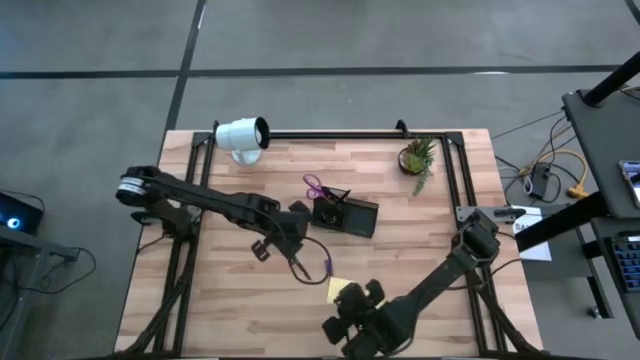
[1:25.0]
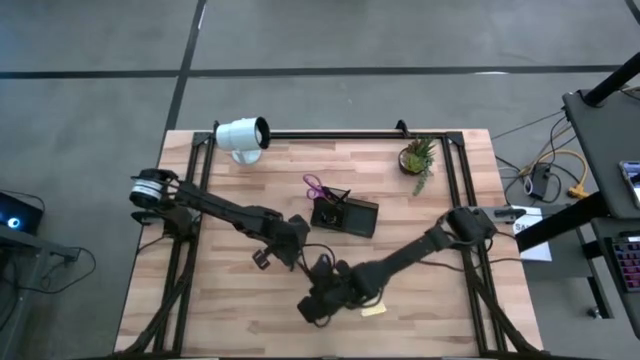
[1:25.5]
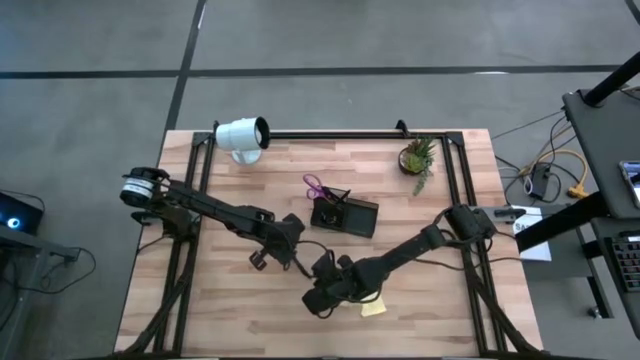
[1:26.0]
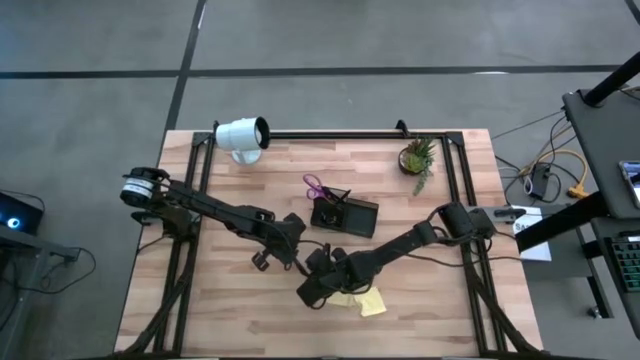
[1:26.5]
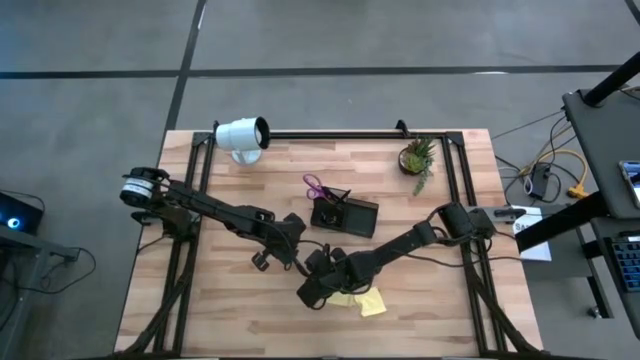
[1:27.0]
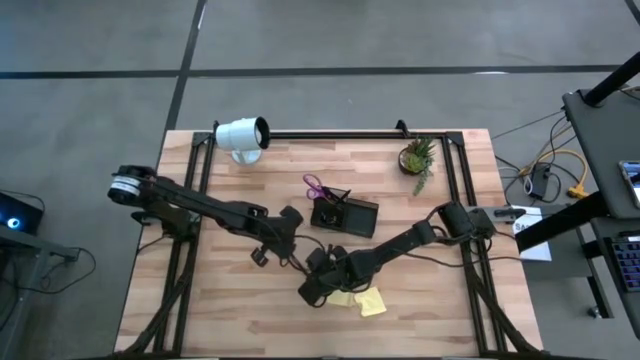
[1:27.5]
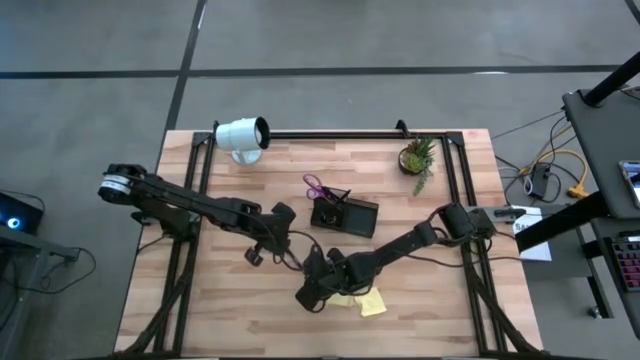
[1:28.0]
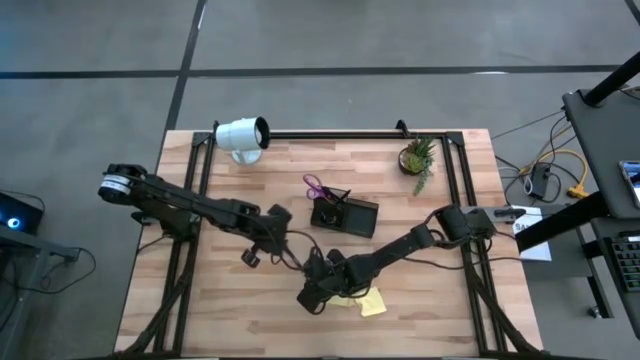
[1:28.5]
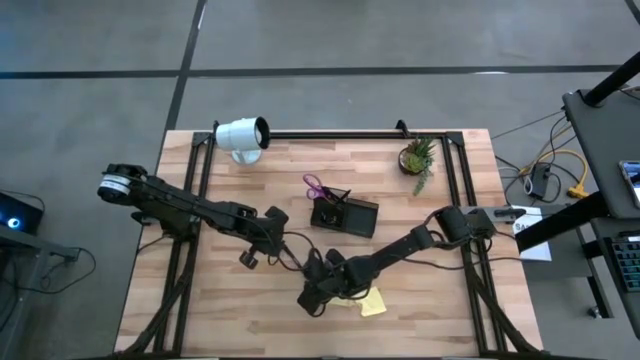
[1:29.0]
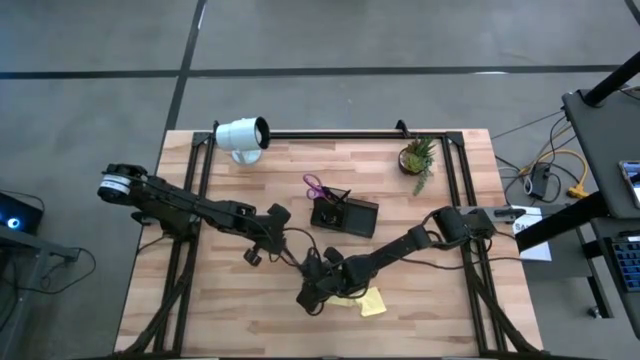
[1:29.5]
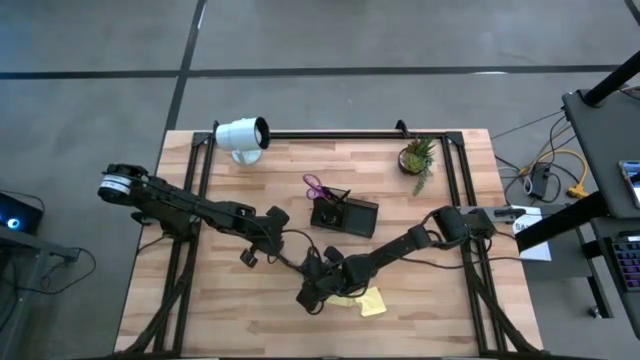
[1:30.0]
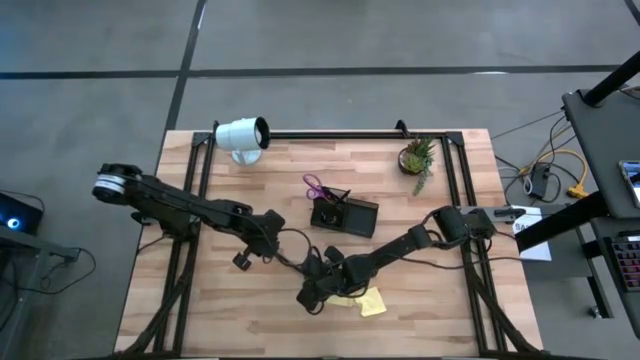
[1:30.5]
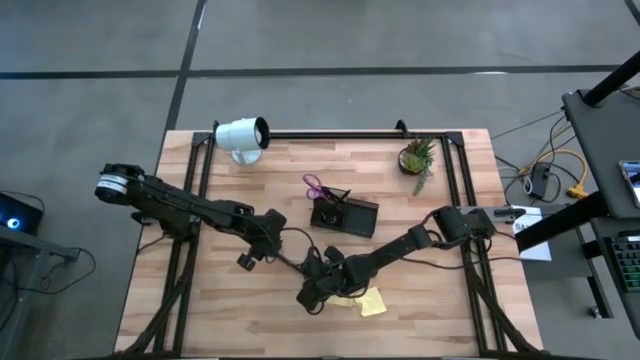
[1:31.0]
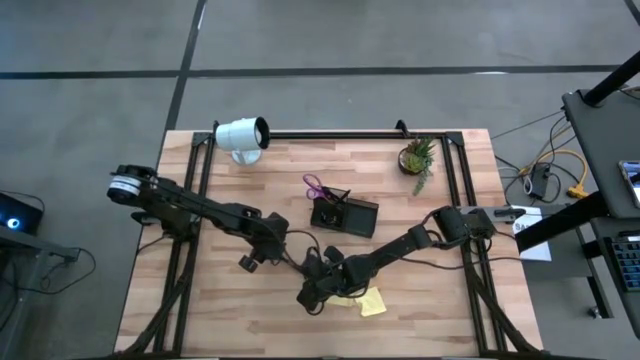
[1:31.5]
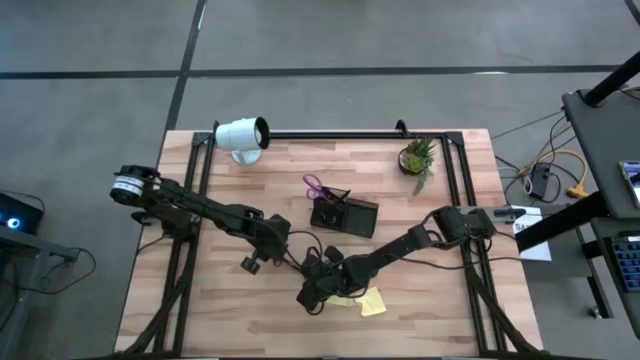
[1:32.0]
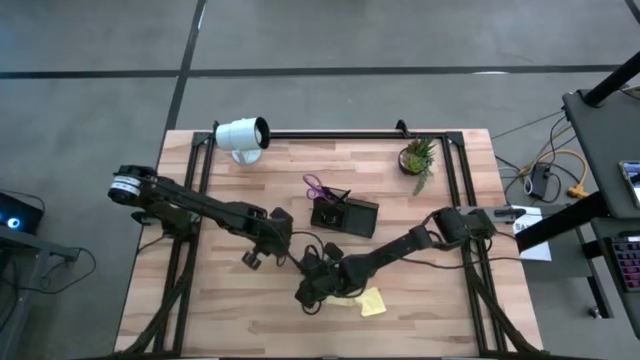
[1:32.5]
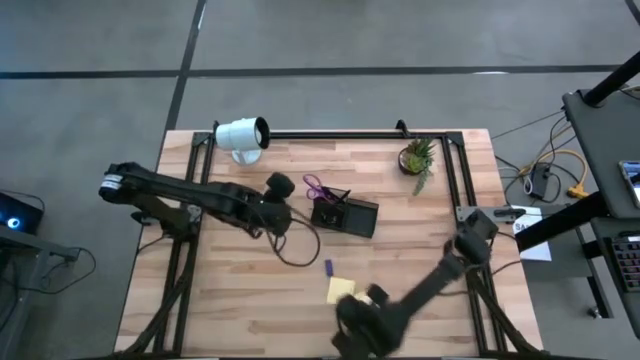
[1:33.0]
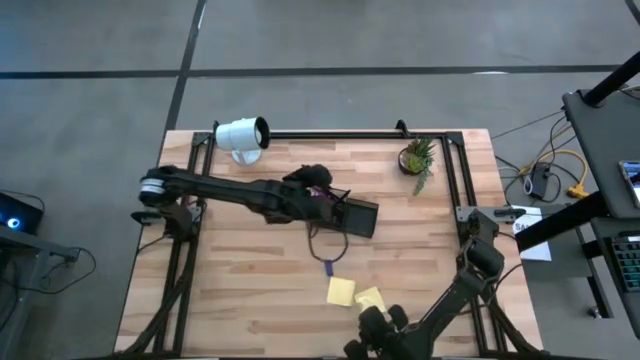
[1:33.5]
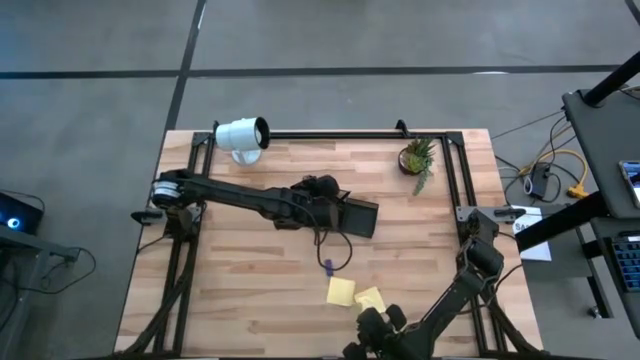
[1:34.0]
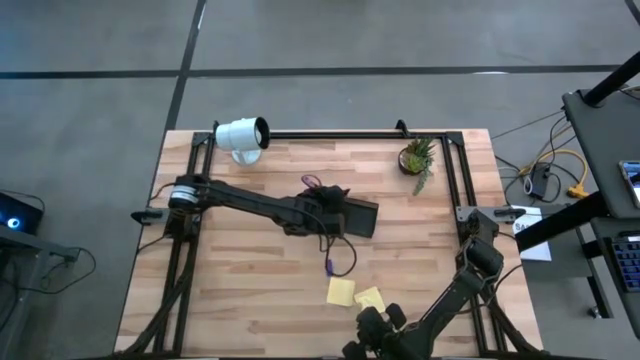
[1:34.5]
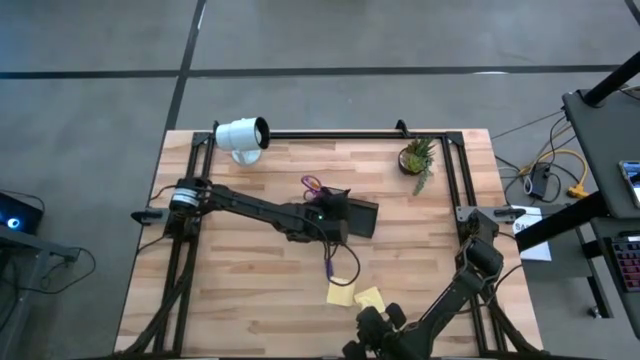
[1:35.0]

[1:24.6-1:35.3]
Task: Pick and place office supplies into organizer
Put the black pen into the black desk organizer

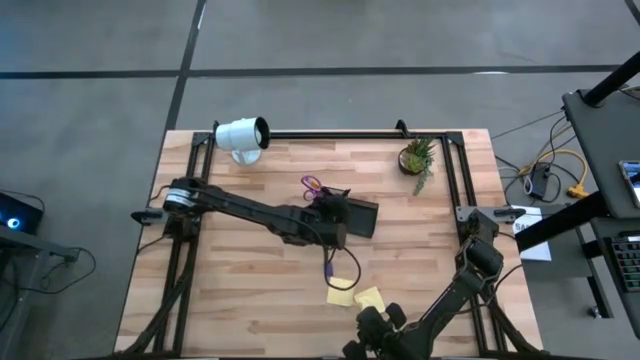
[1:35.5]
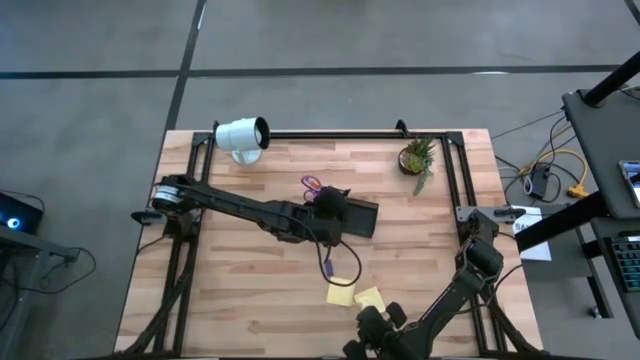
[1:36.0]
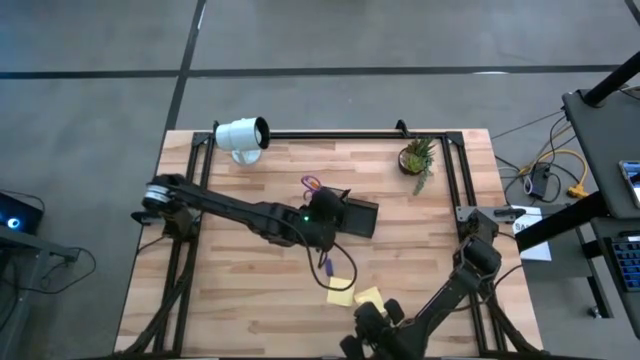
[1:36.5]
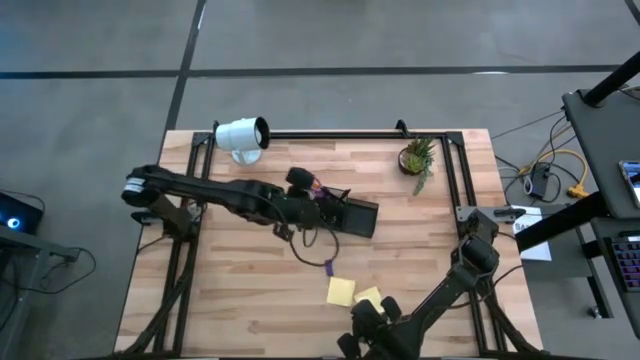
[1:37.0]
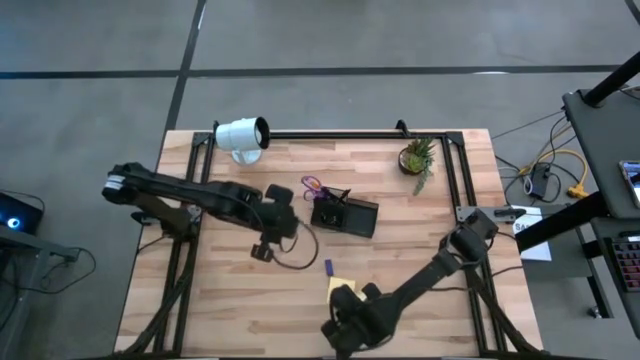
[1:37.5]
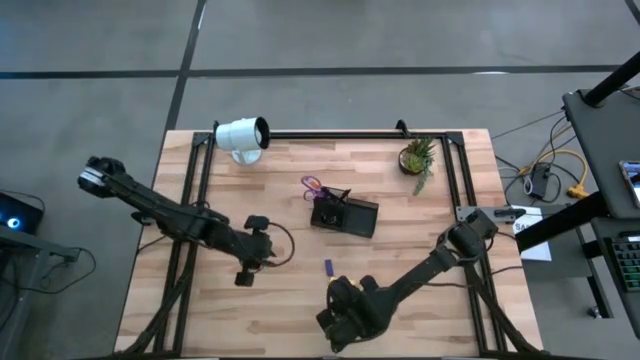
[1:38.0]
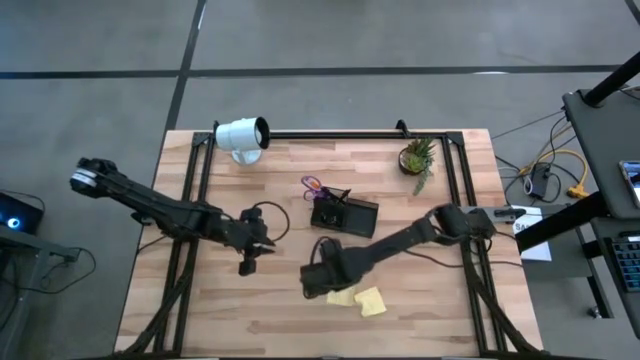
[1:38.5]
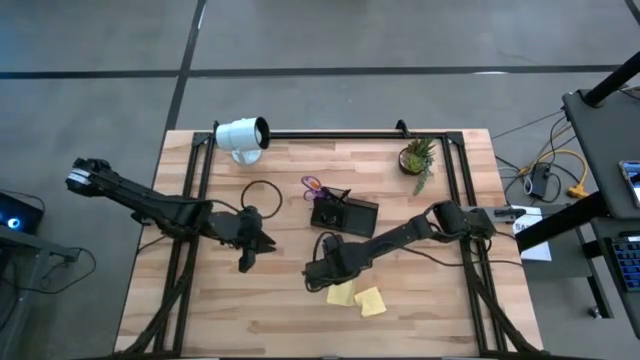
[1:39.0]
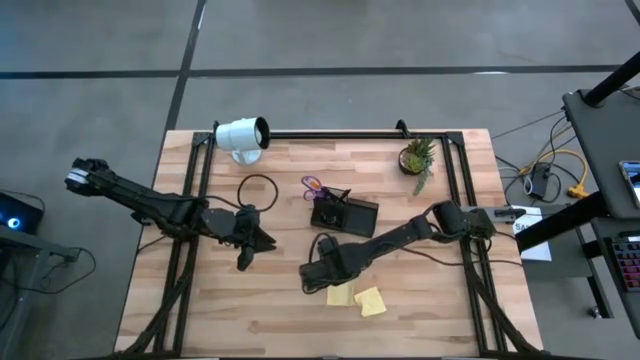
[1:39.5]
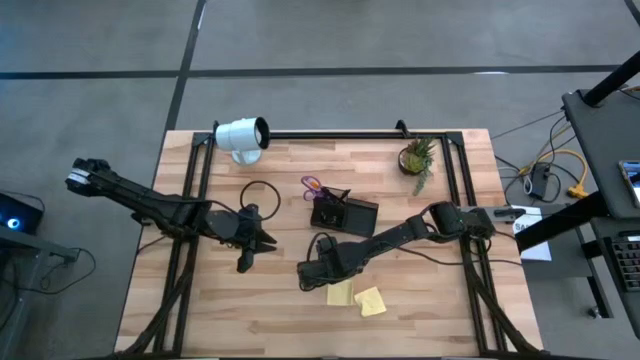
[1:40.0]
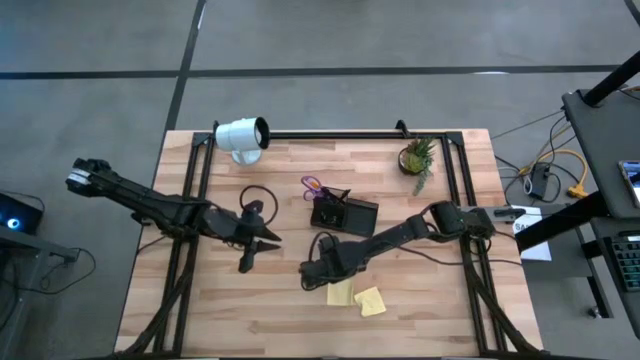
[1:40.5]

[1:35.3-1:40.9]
Put the blue eraser into the black desk organizer

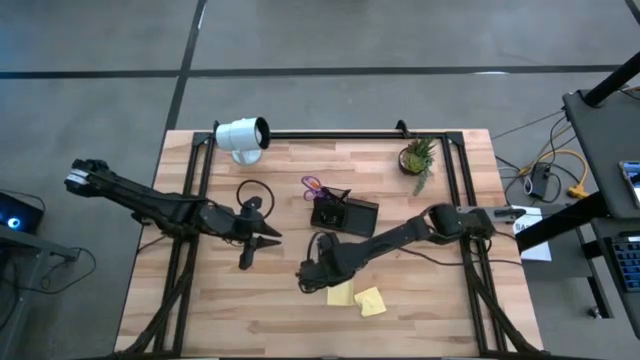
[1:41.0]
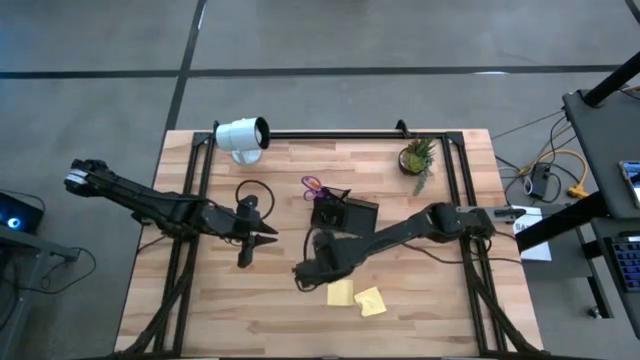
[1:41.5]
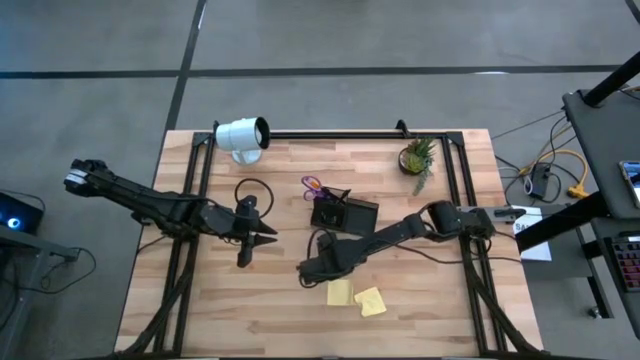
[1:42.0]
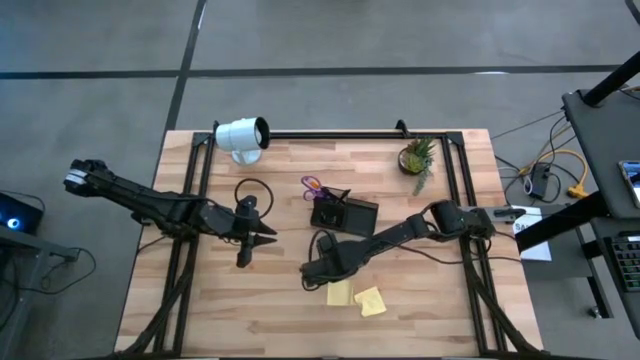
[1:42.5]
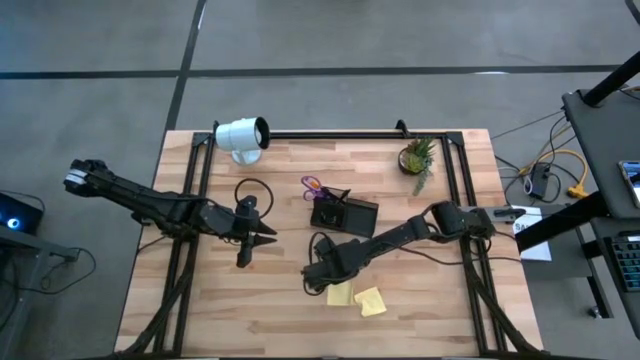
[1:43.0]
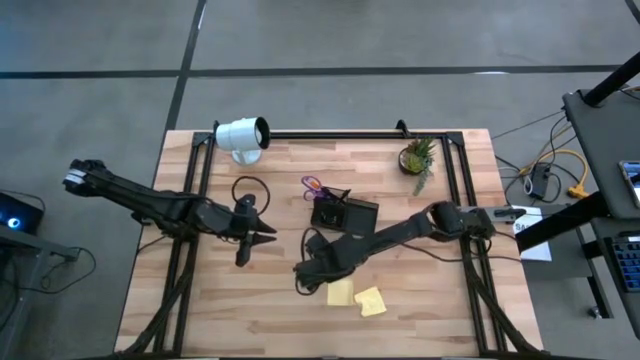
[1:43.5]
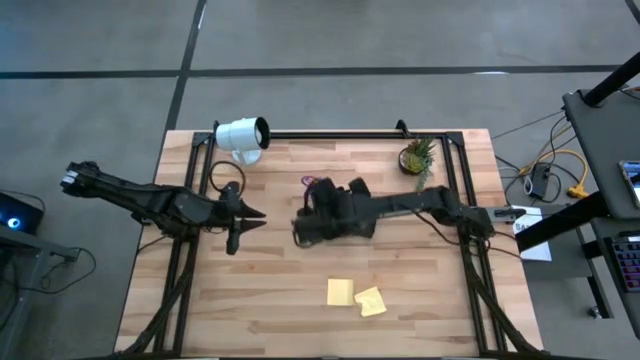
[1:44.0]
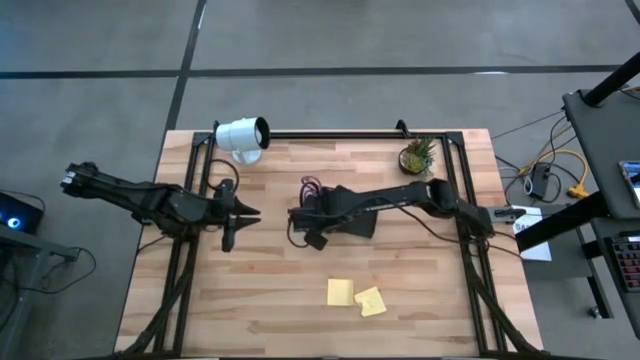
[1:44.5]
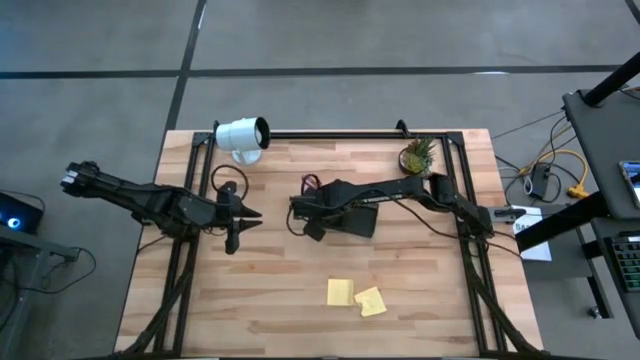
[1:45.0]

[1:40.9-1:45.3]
Put the blue eraser into the black desk organizer
